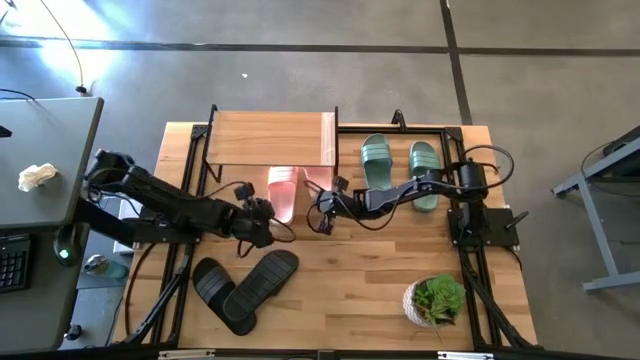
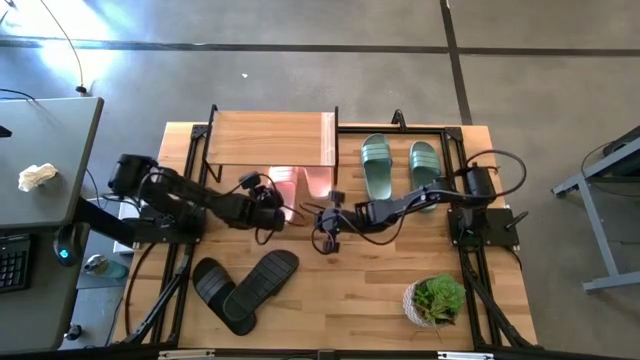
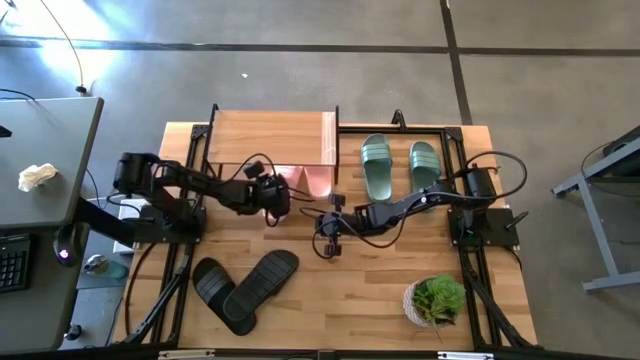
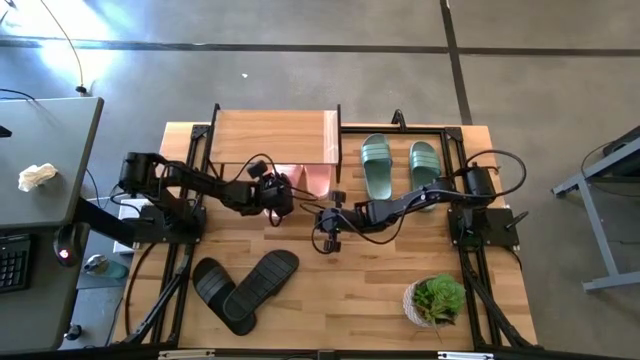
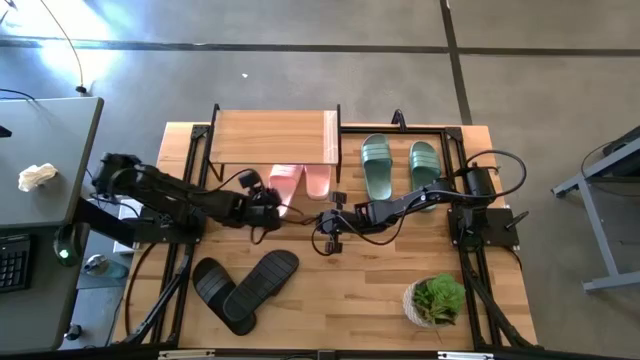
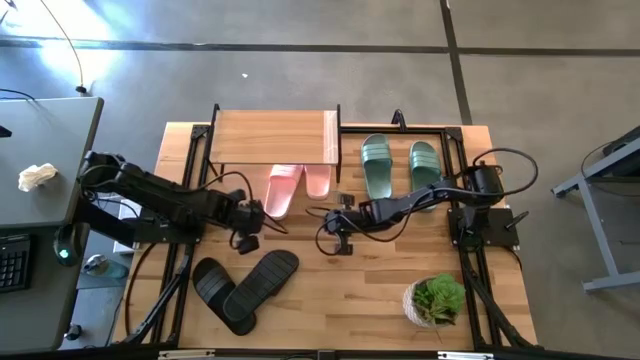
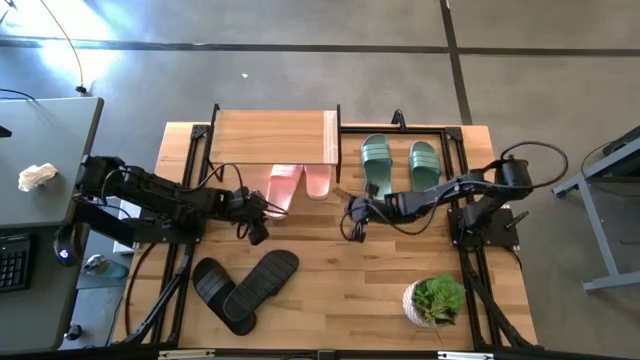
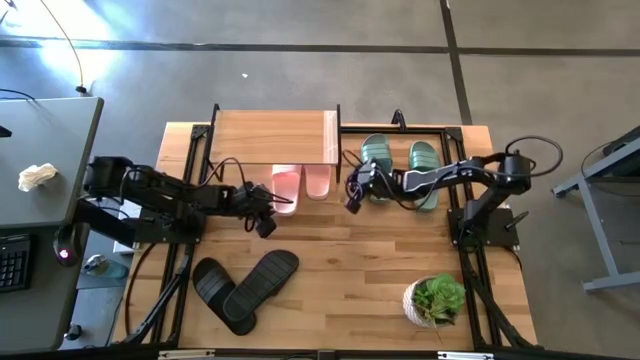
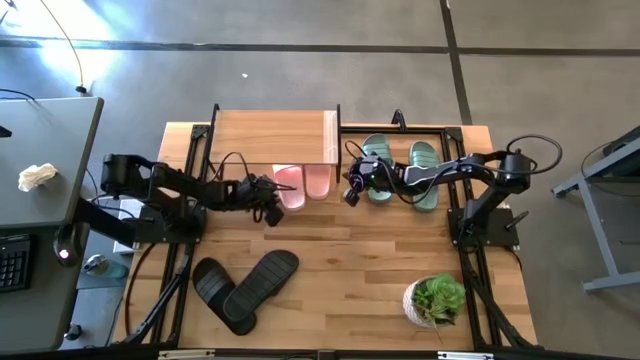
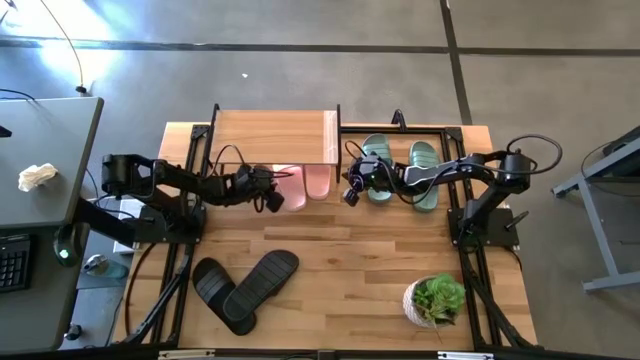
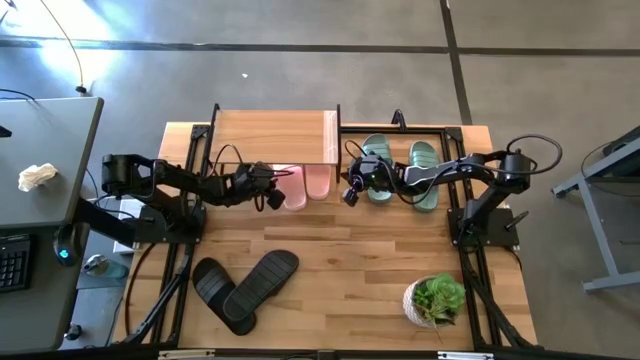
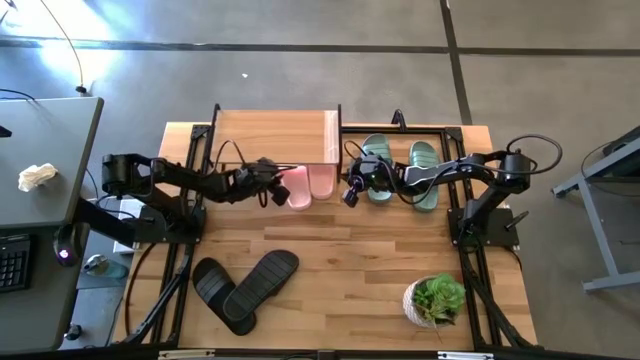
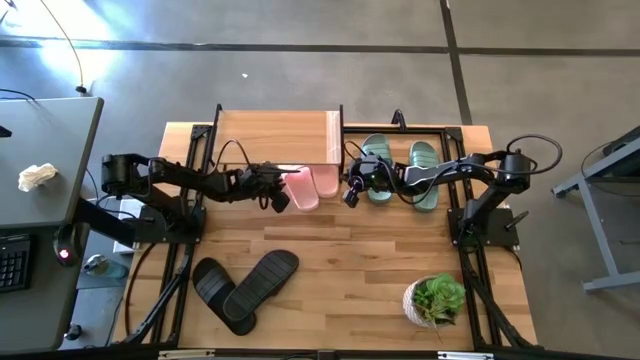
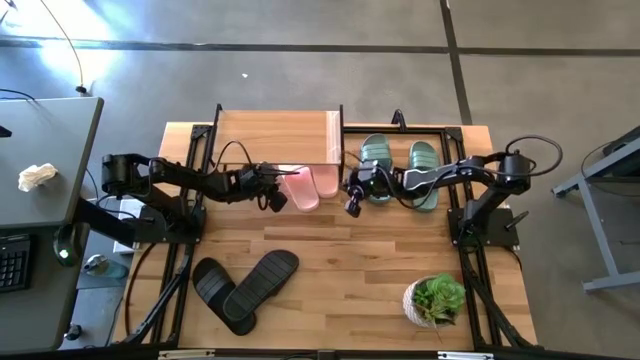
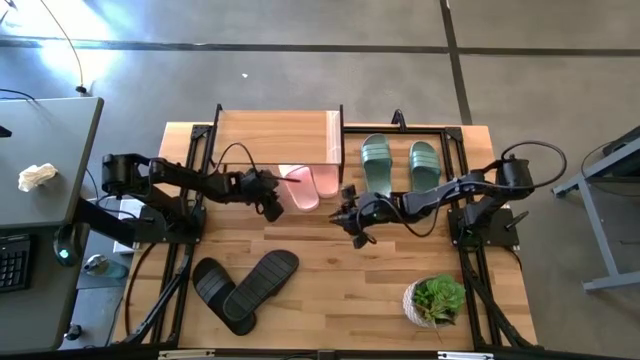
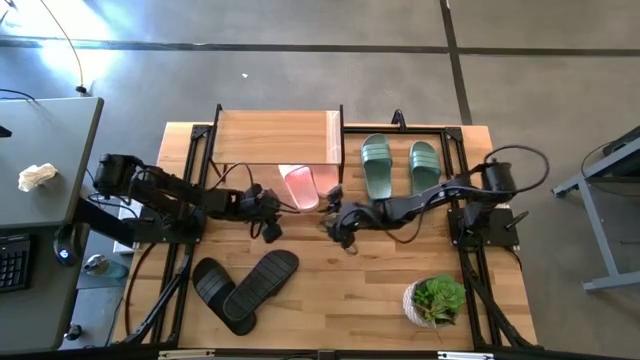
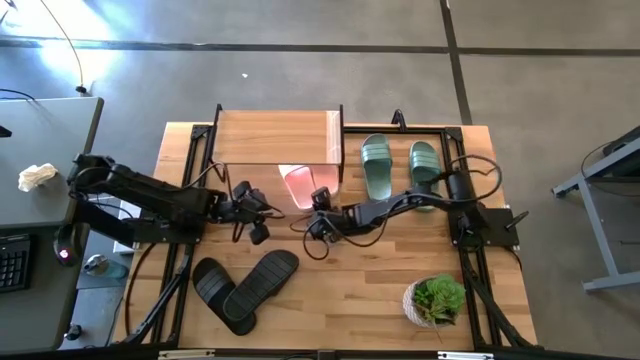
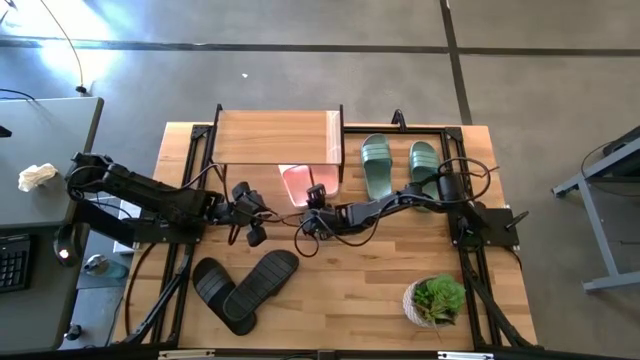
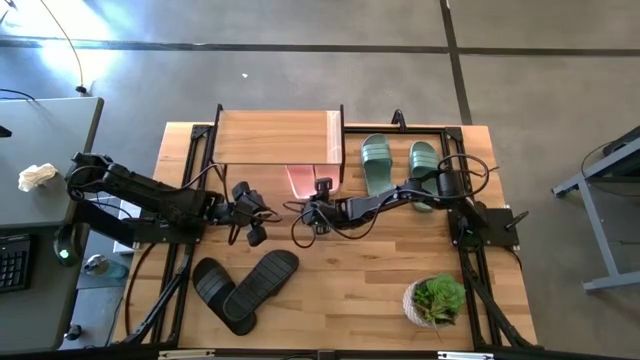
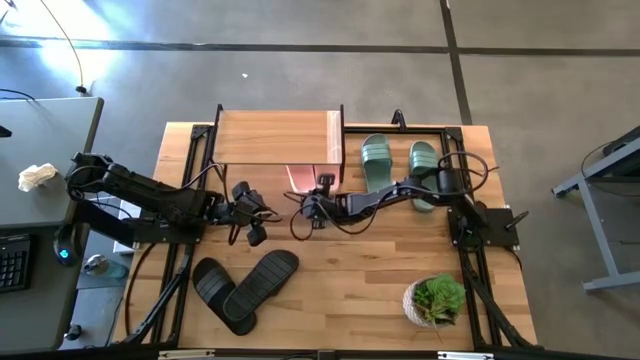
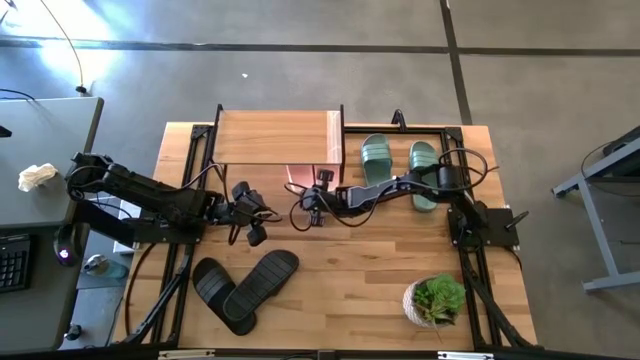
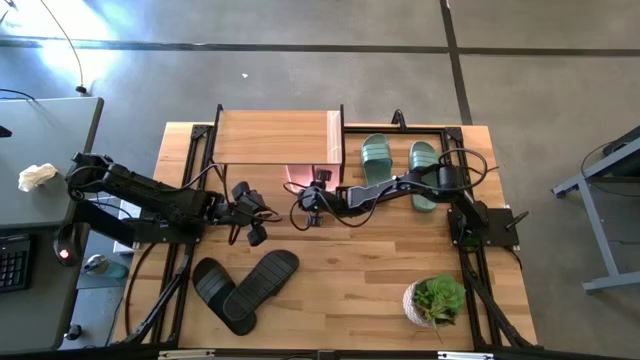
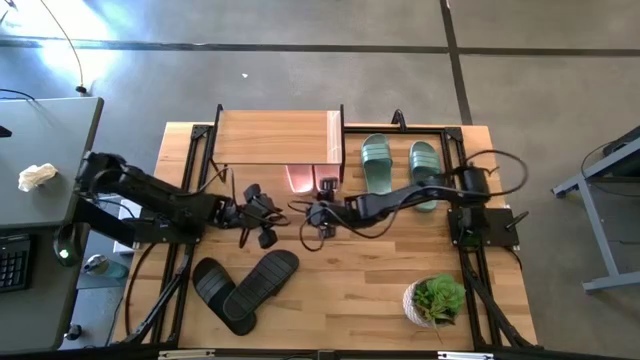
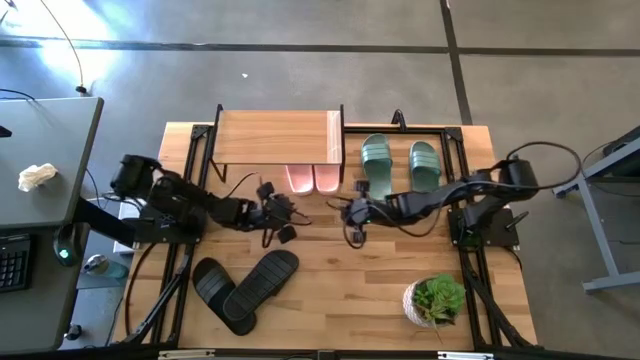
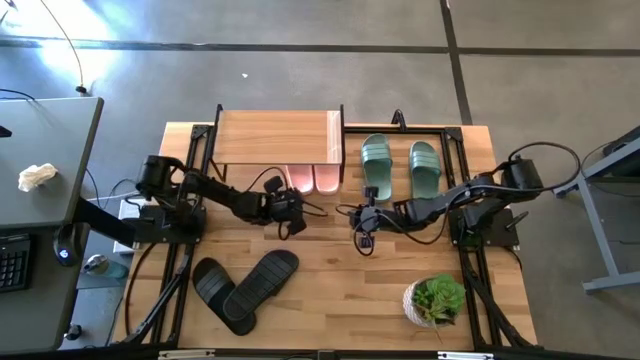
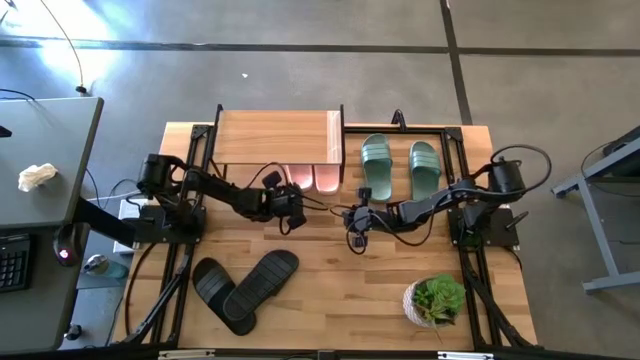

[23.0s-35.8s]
Task: Pick and place slides into the shelf
Adjust the left pink slipper under the shelf

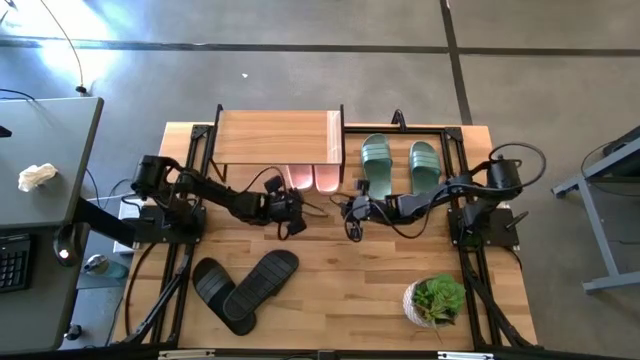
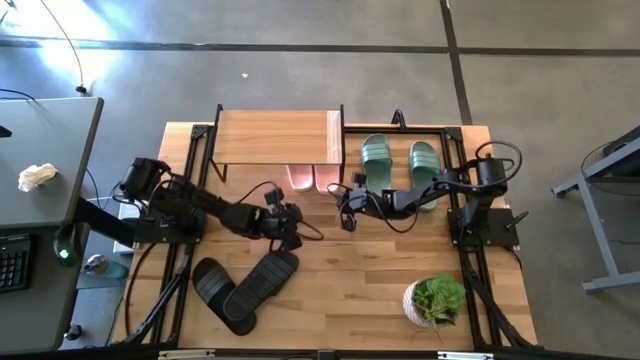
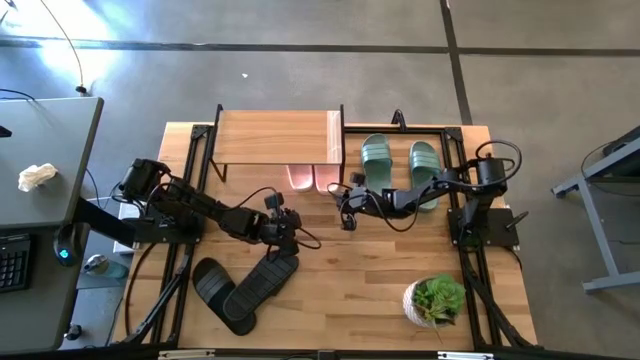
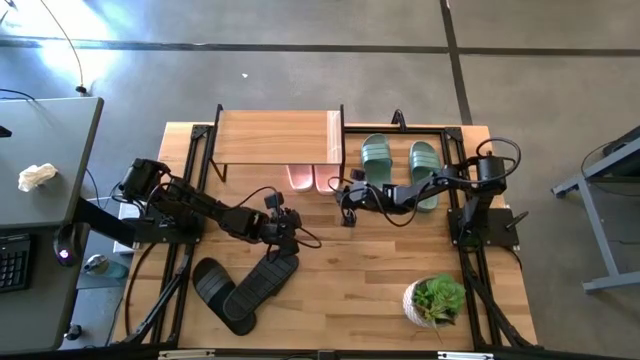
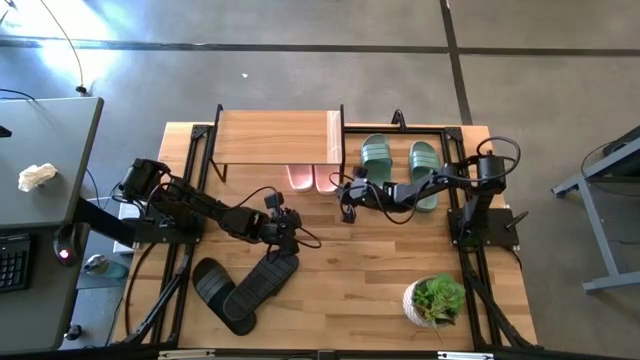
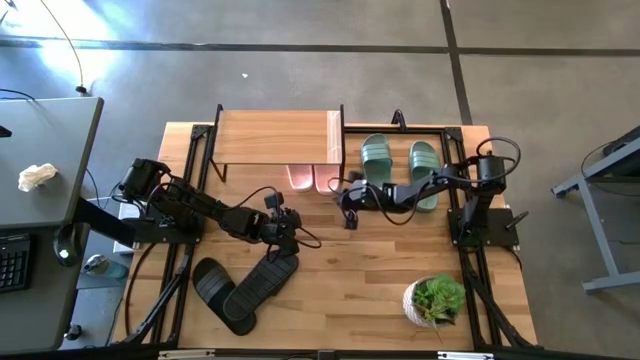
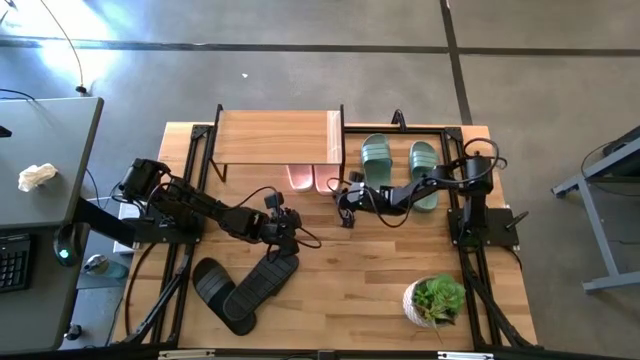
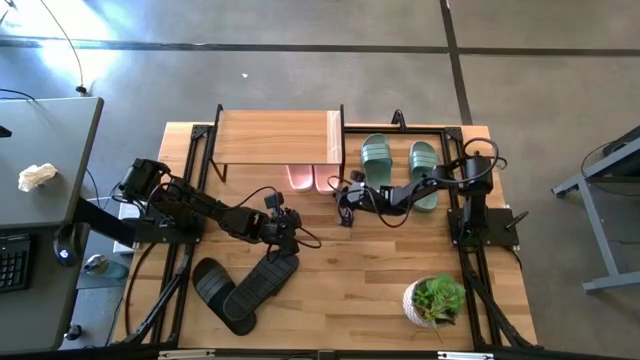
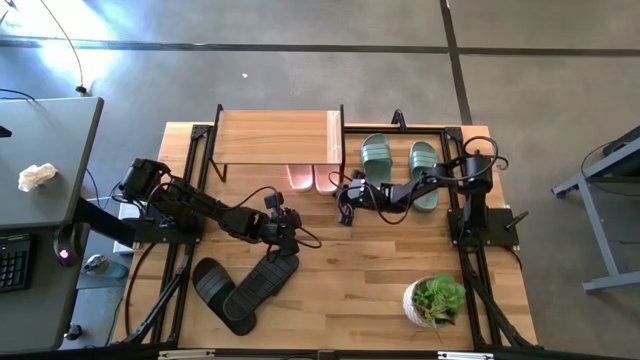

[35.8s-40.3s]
Adjust the right pink slipper under the shelf
